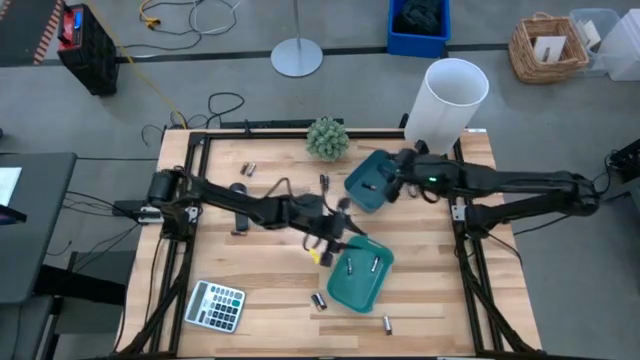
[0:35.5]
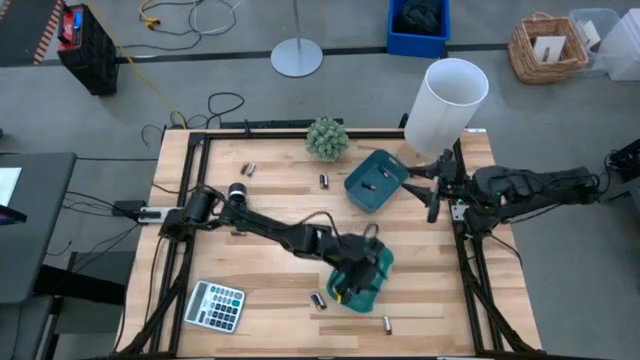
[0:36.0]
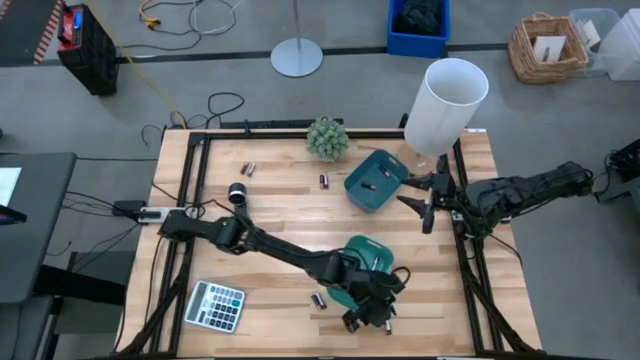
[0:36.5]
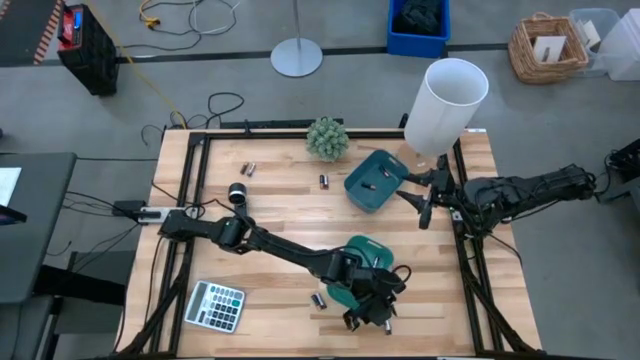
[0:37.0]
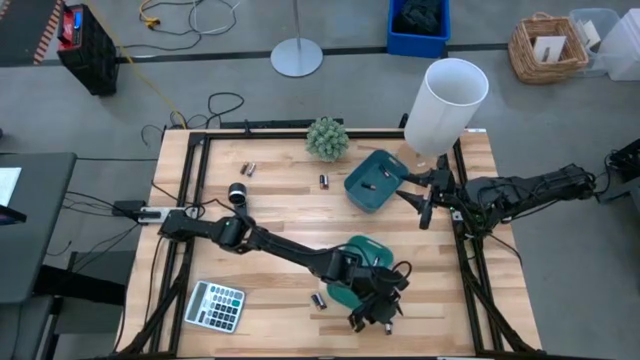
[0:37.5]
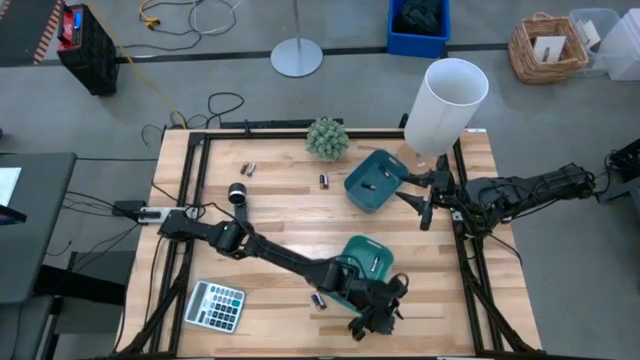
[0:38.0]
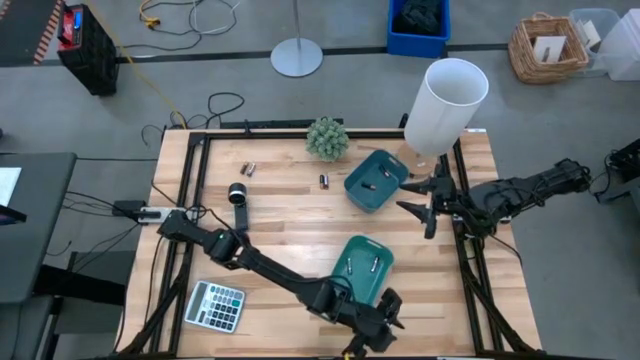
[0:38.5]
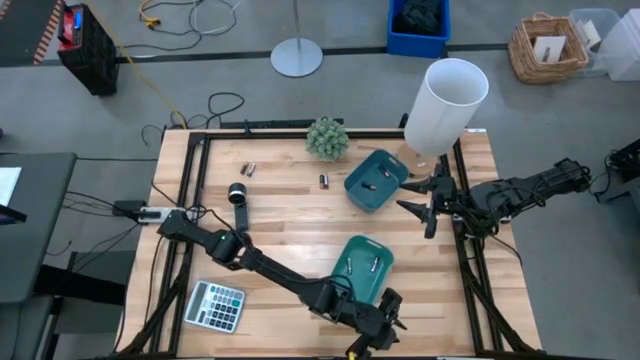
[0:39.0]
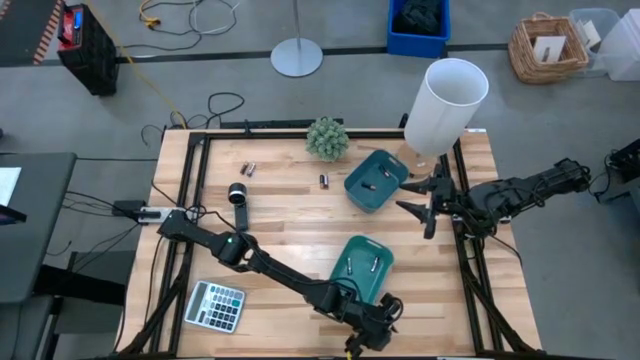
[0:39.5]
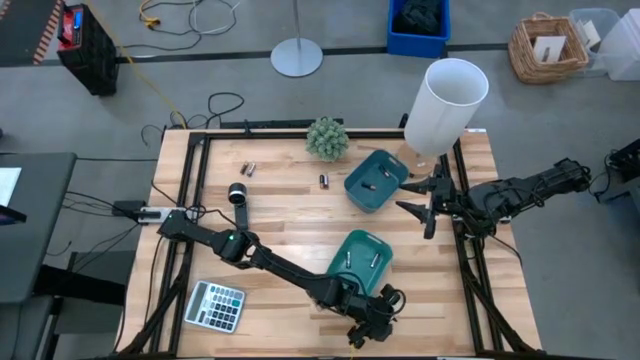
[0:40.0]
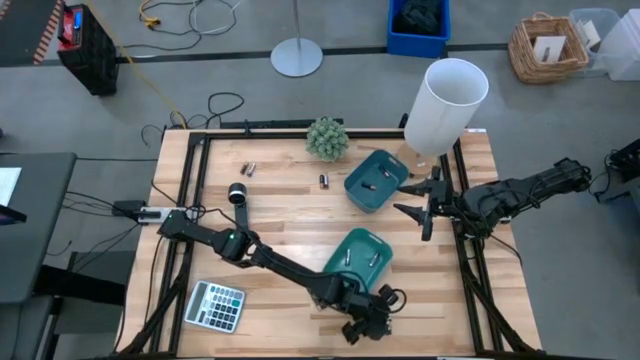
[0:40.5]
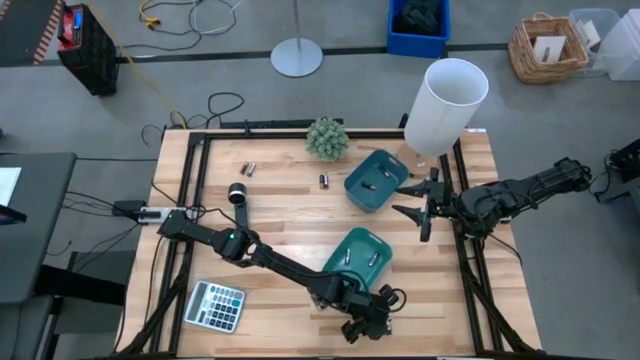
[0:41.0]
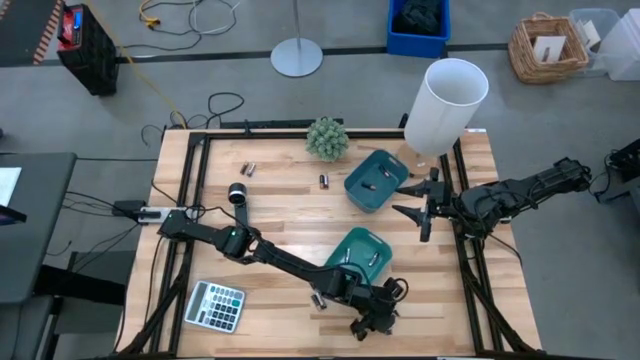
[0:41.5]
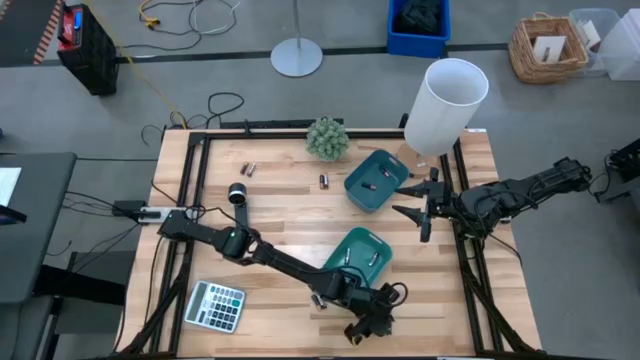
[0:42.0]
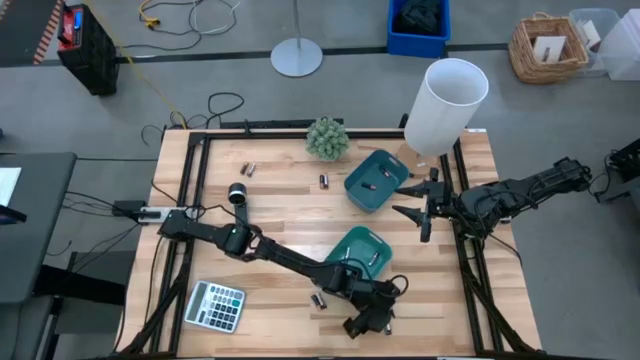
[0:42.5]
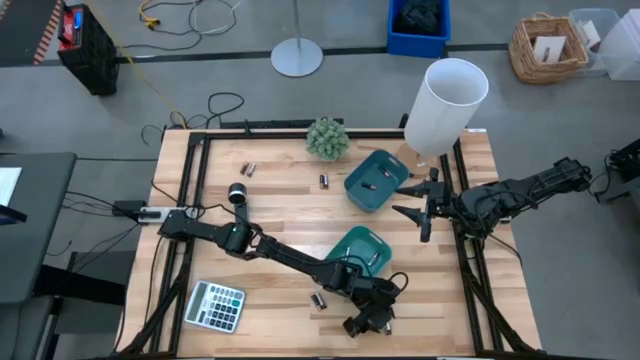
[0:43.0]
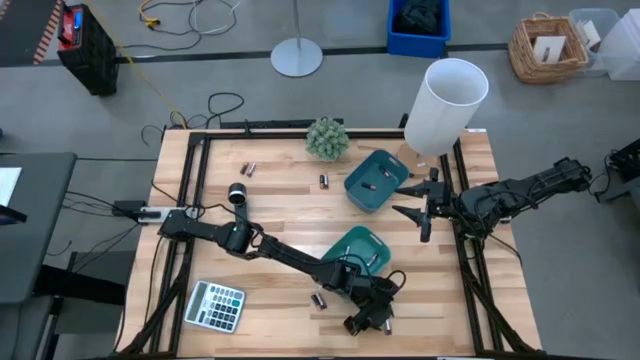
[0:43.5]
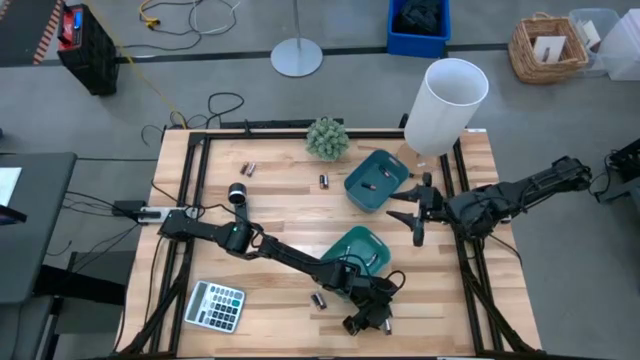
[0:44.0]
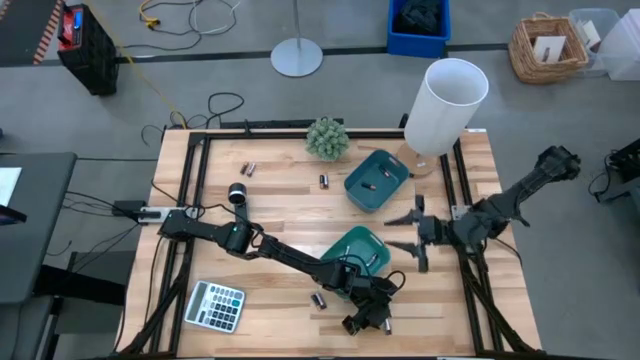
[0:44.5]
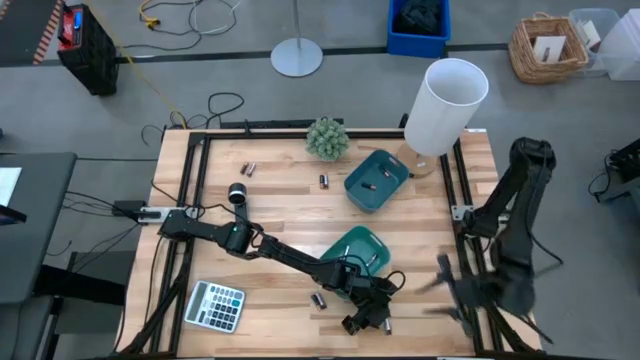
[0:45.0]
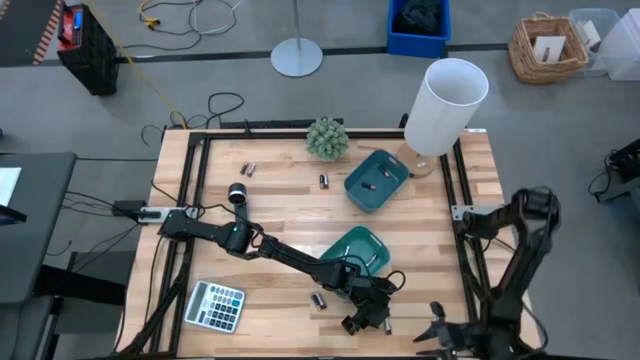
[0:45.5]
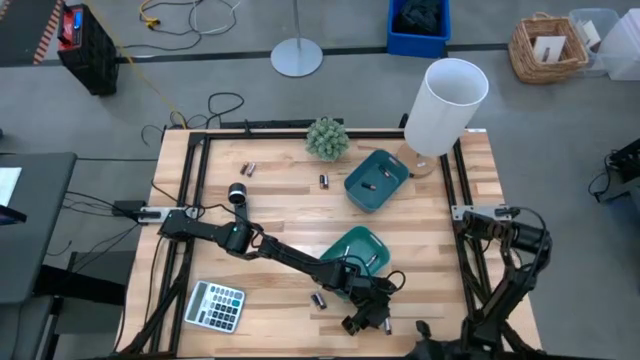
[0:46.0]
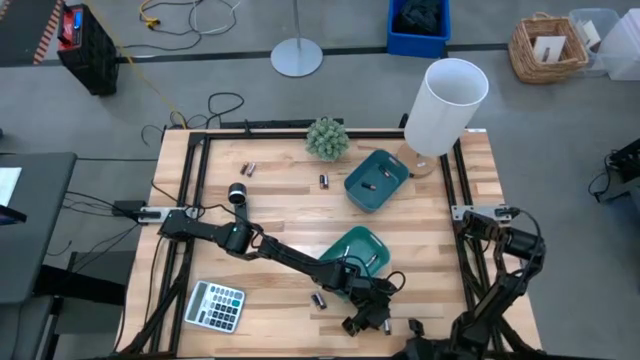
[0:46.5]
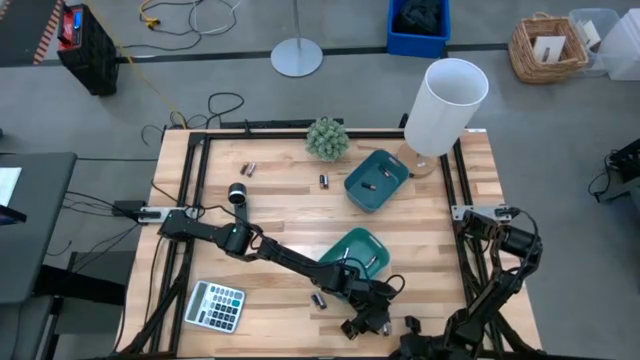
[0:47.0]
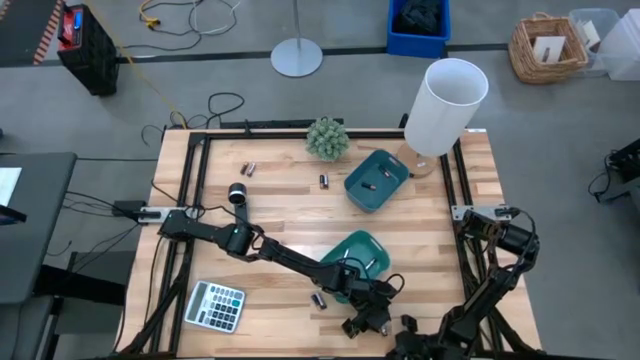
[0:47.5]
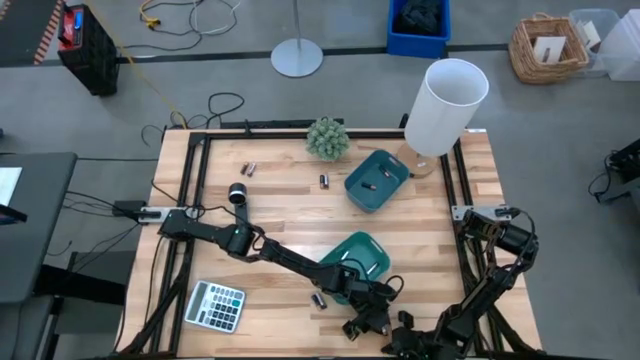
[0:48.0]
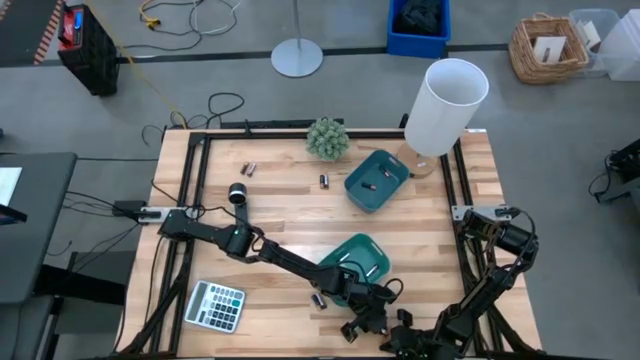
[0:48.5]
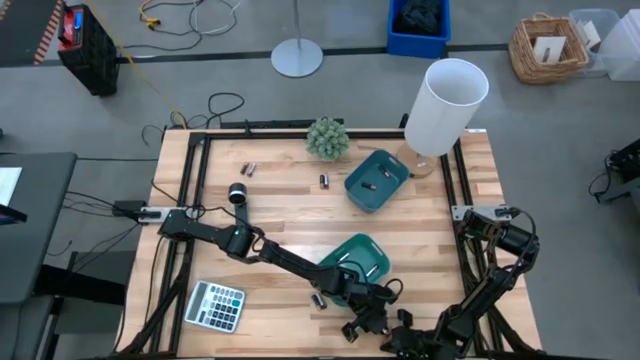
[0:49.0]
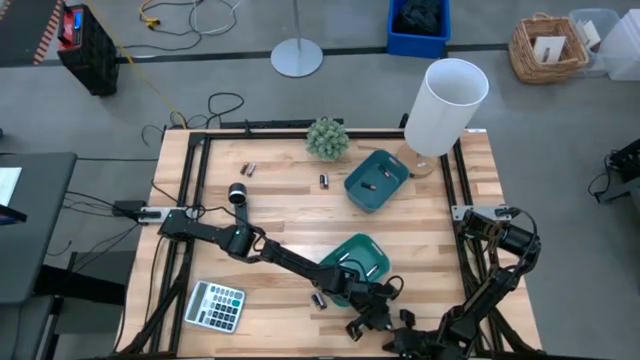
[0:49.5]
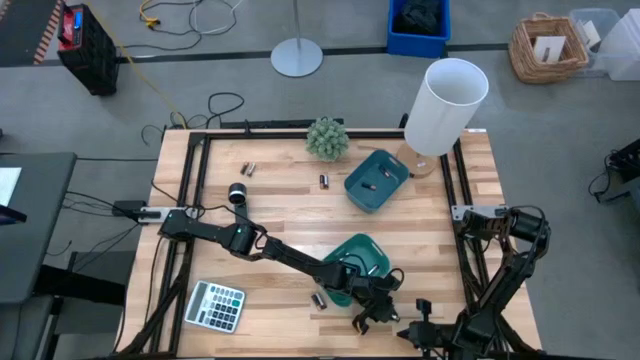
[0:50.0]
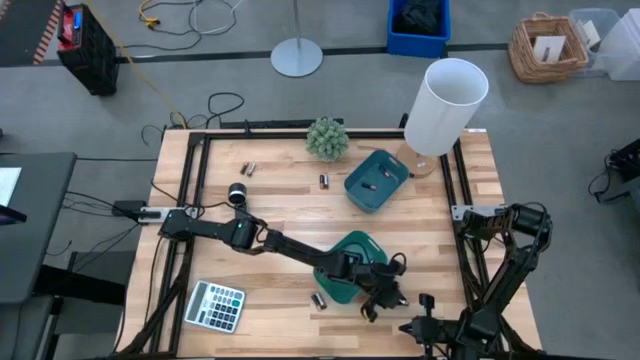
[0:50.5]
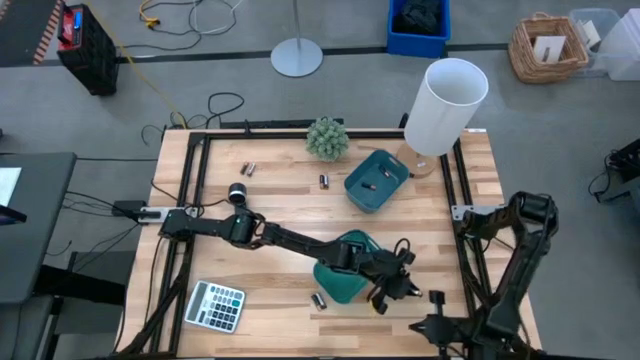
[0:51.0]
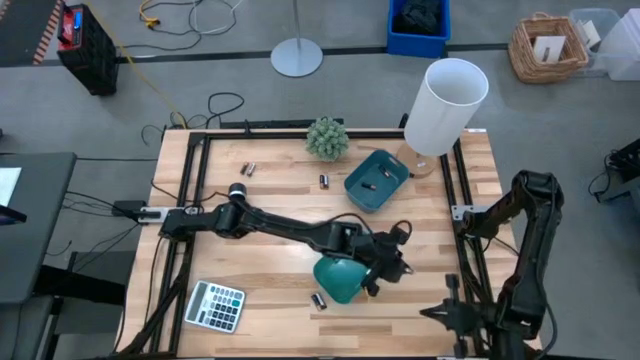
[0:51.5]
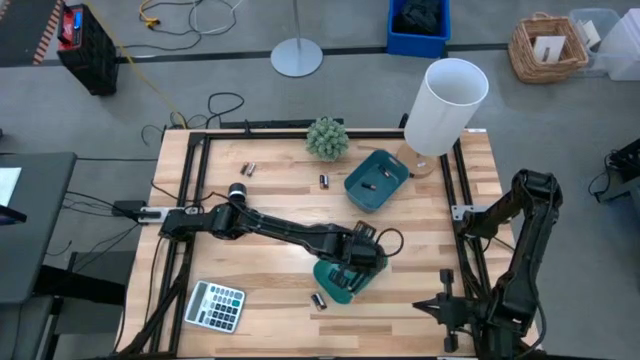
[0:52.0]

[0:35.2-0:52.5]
Task: Sort batteries
Put the silver battery into the green bin

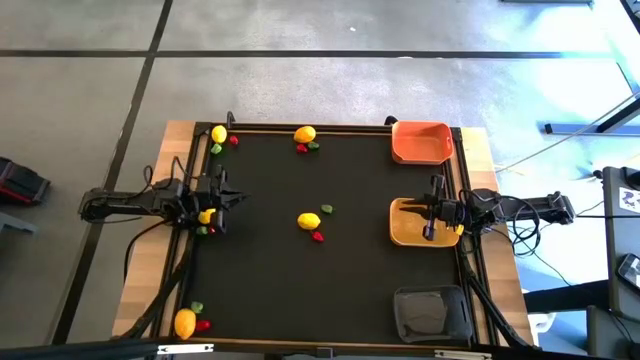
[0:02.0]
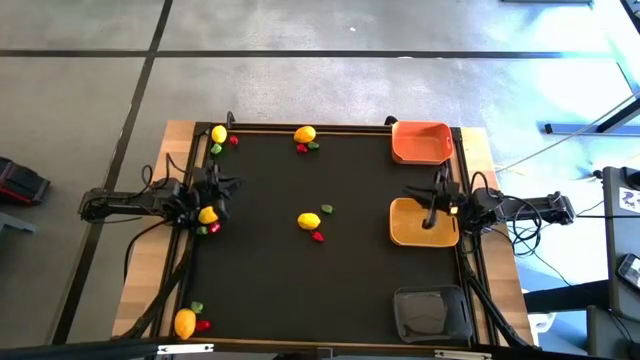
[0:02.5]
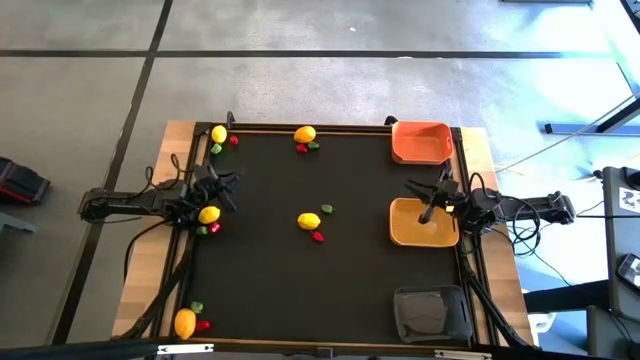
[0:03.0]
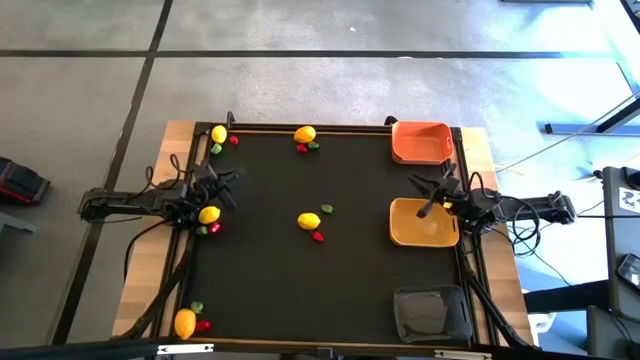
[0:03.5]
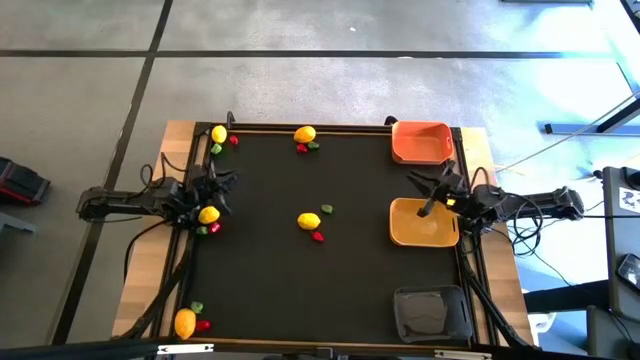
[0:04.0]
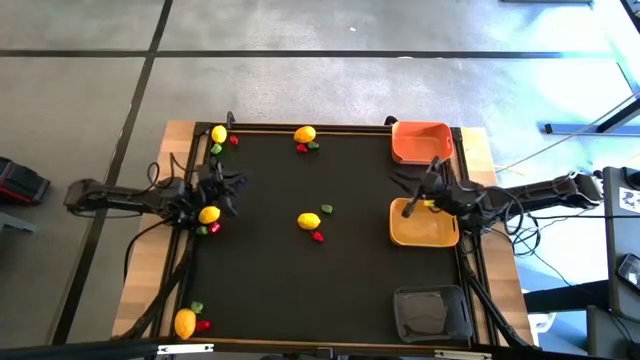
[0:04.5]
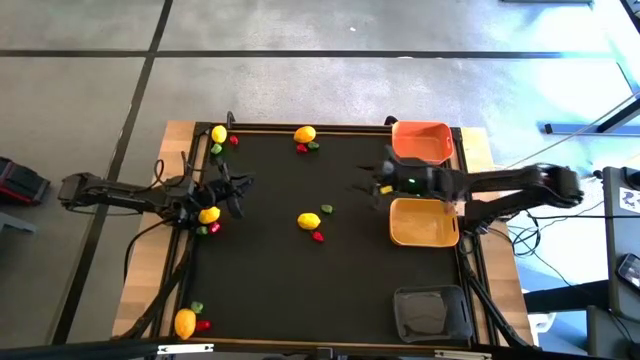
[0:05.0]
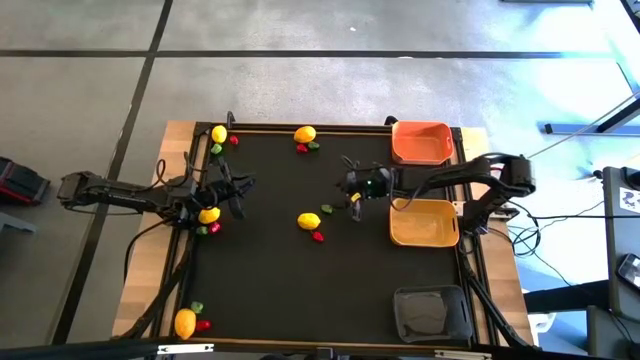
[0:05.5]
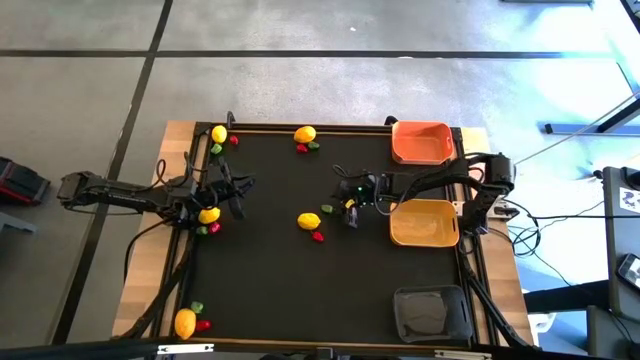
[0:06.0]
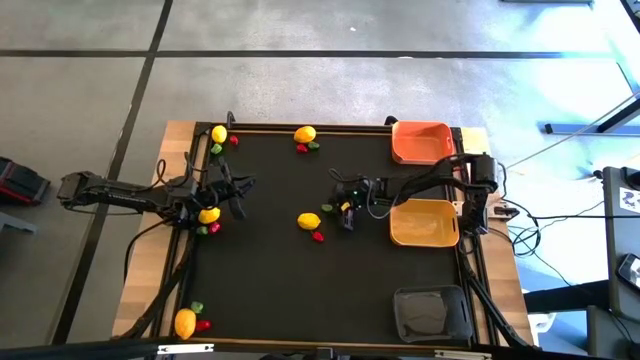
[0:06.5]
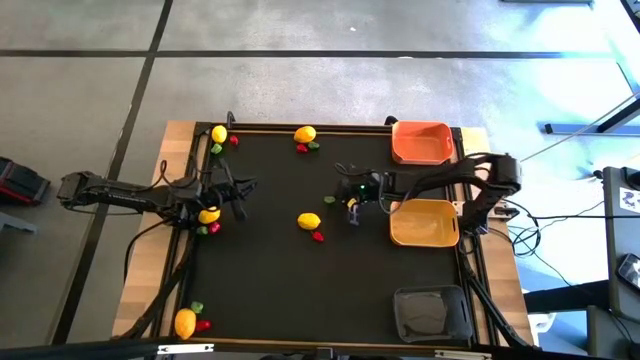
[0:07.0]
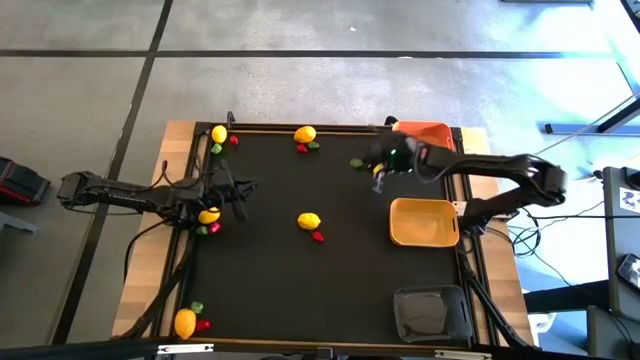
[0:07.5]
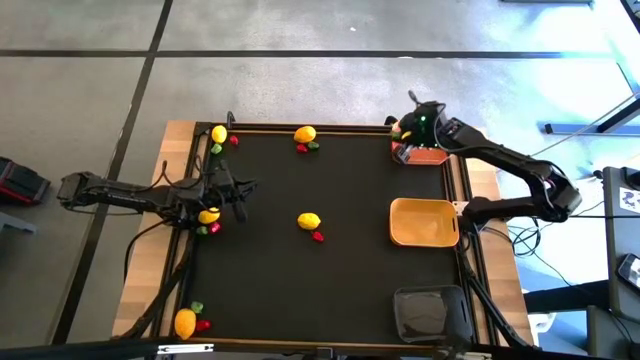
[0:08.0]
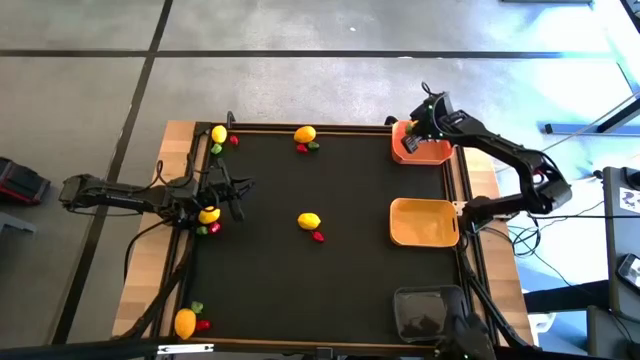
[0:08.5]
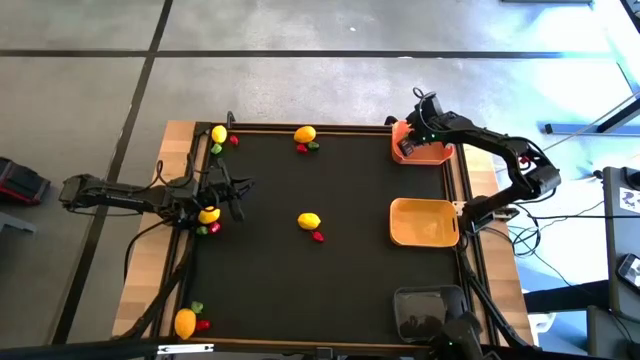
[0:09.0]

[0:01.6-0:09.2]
Task: Sort produce into baskets
Put the middle right green chili pepper into the orange bin
